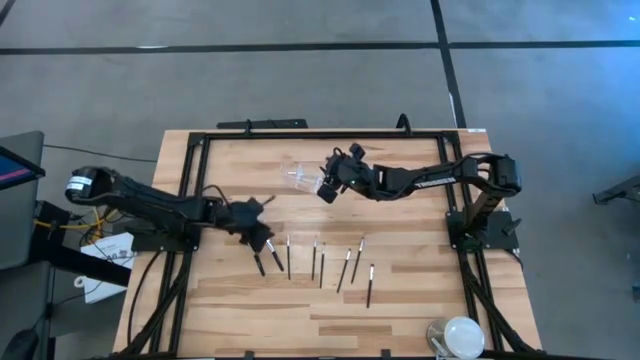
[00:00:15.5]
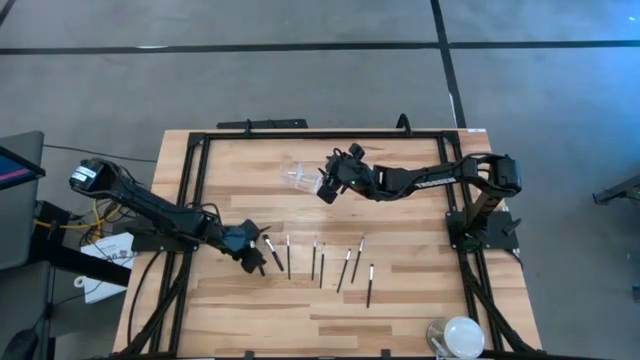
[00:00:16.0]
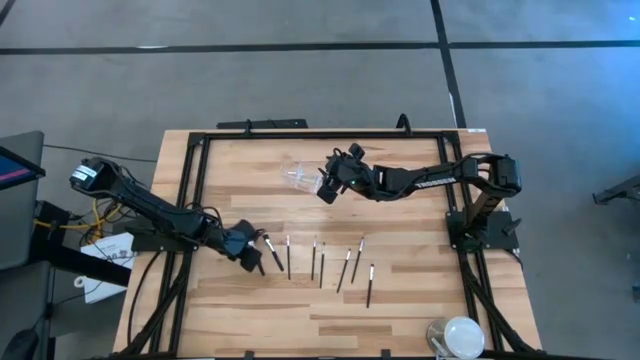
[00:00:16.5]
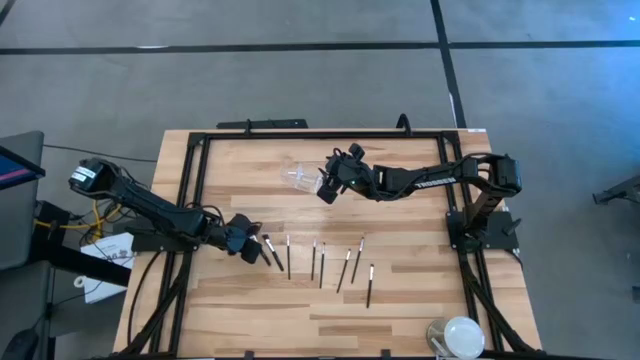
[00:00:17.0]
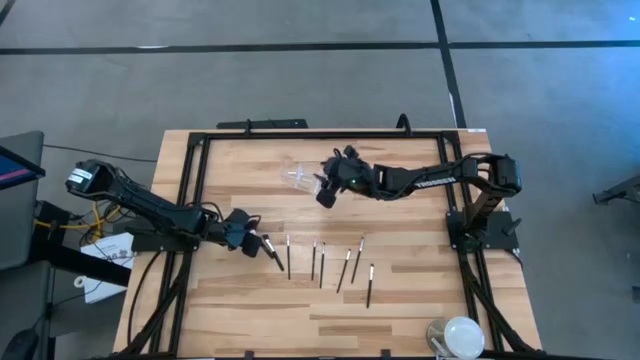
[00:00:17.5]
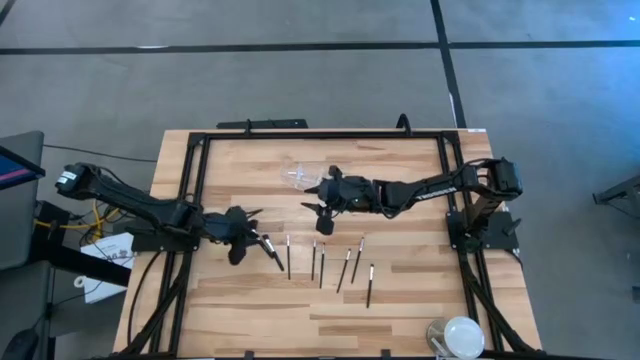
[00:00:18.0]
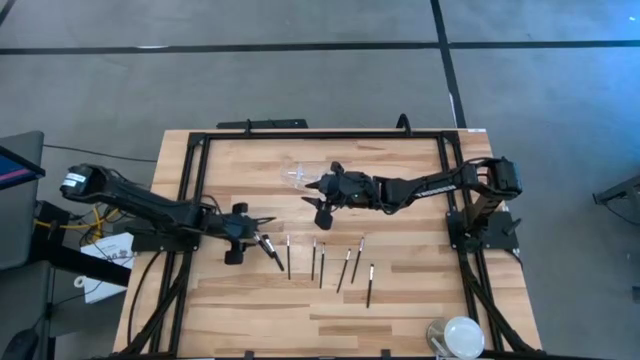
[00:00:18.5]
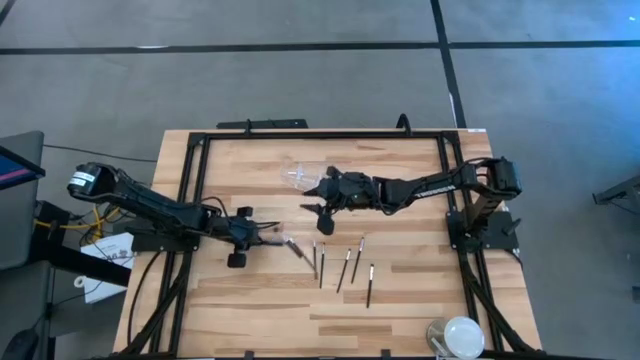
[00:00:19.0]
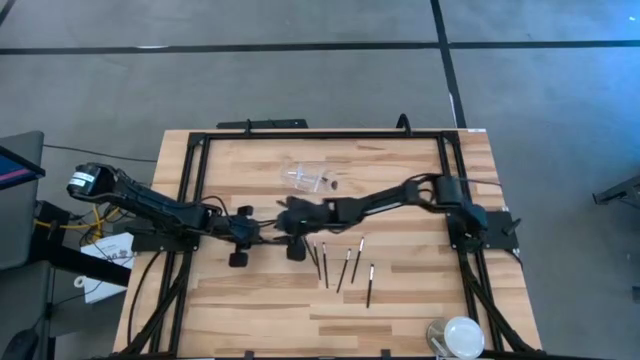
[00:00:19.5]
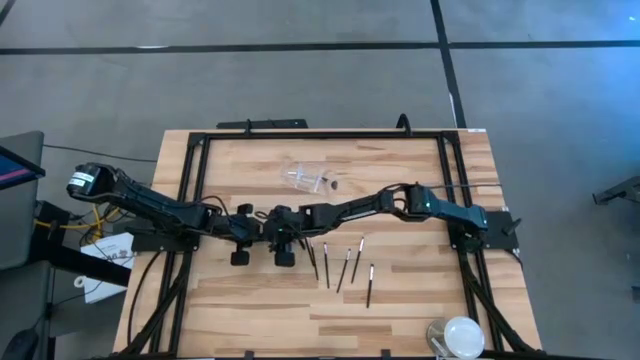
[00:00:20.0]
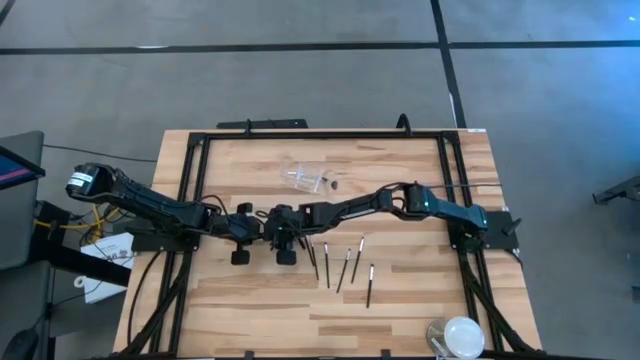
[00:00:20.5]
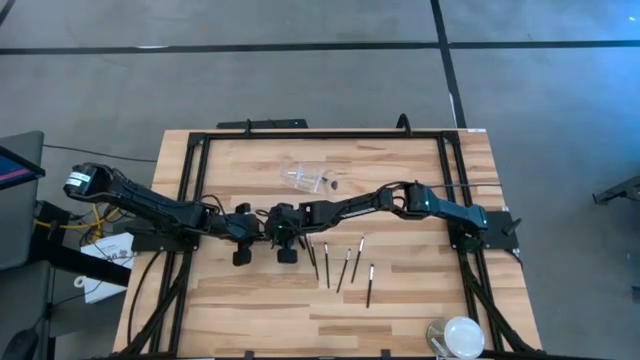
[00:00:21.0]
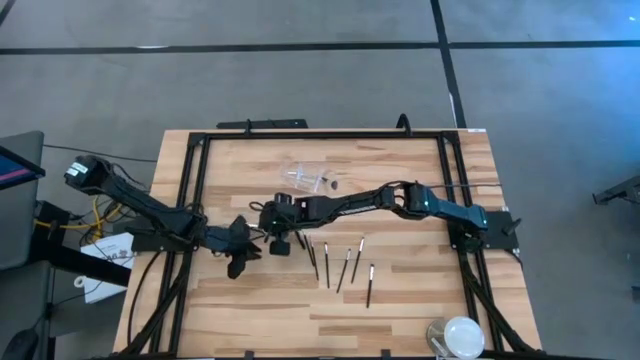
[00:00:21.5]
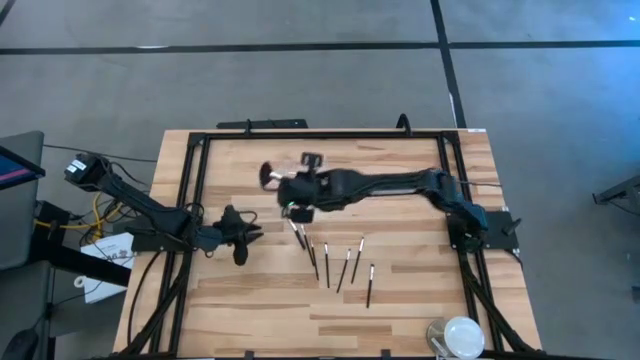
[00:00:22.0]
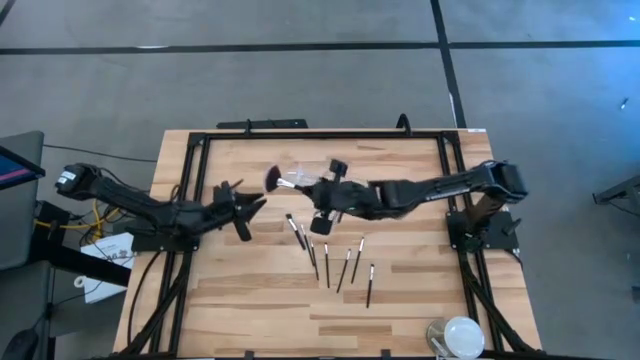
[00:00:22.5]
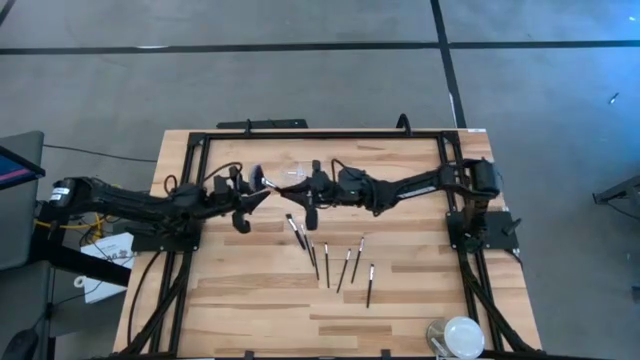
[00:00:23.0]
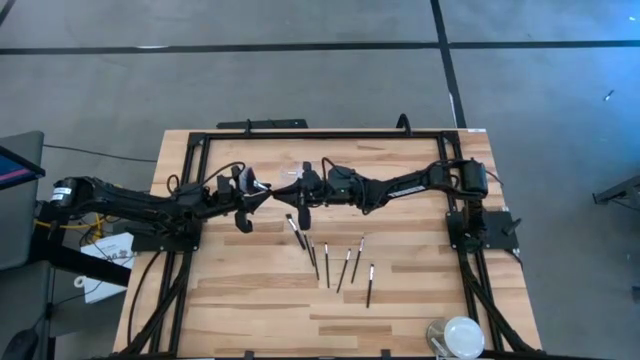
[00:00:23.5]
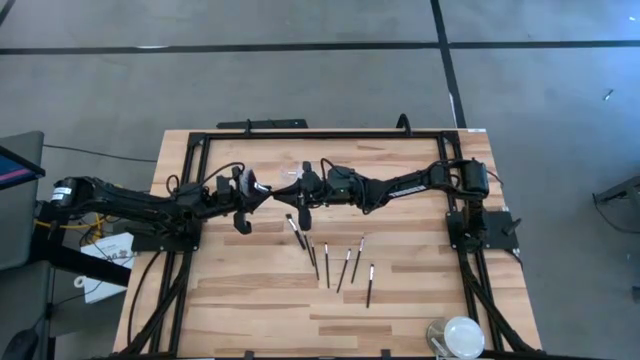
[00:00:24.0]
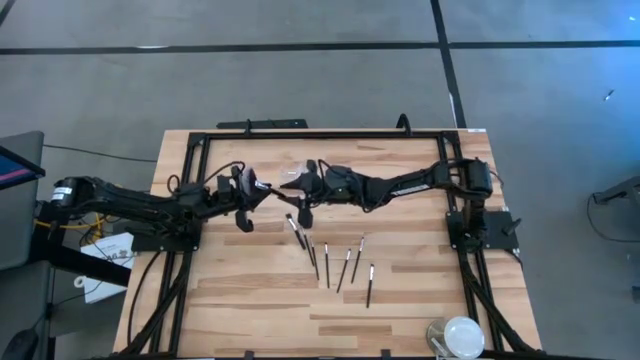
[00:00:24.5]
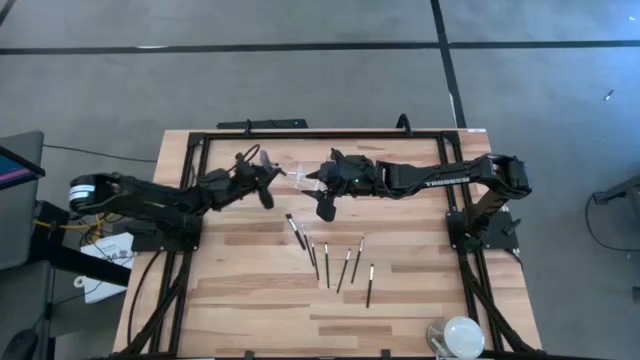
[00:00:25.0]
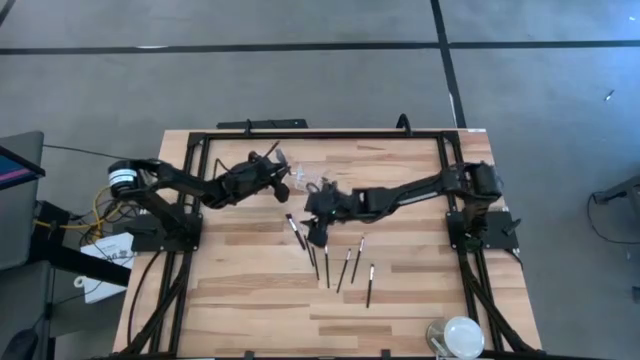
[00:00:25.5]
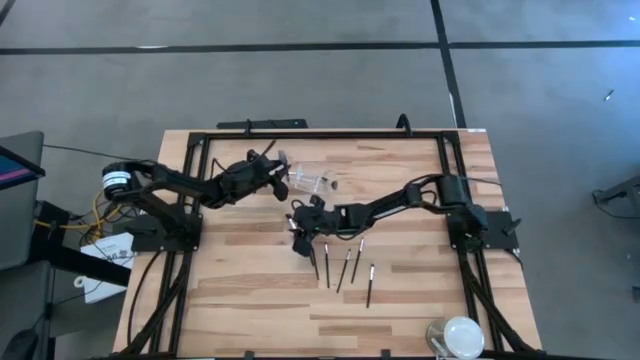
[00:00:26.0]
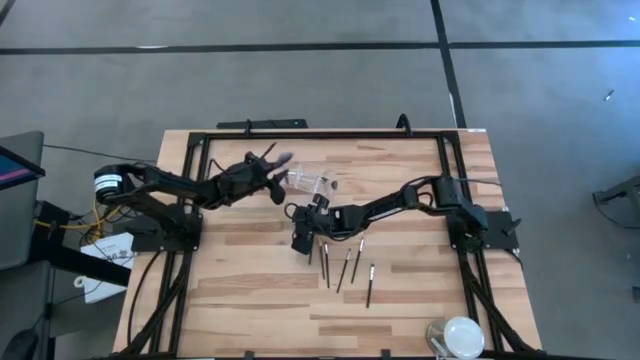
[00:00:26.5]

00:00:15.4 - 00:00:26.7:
Task: Sort items
Put the highlighter brush into the transparent organizer

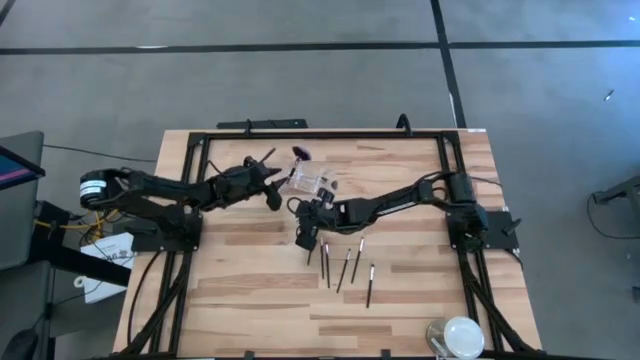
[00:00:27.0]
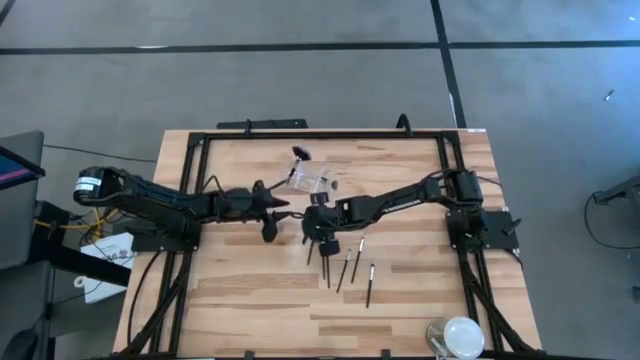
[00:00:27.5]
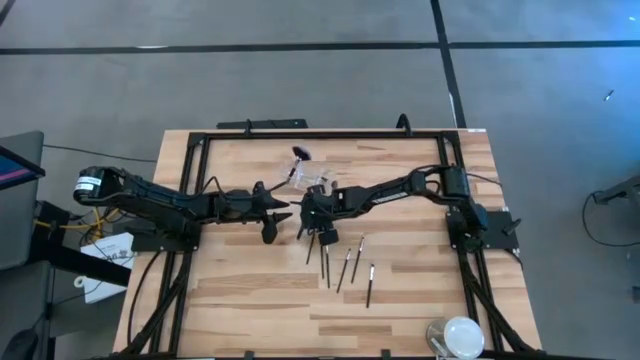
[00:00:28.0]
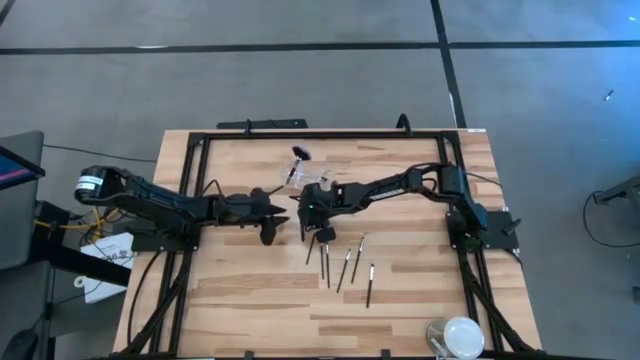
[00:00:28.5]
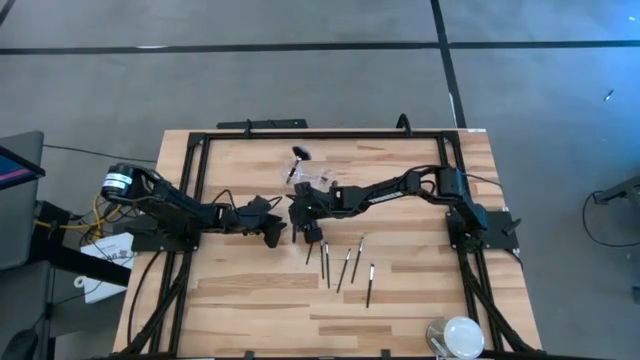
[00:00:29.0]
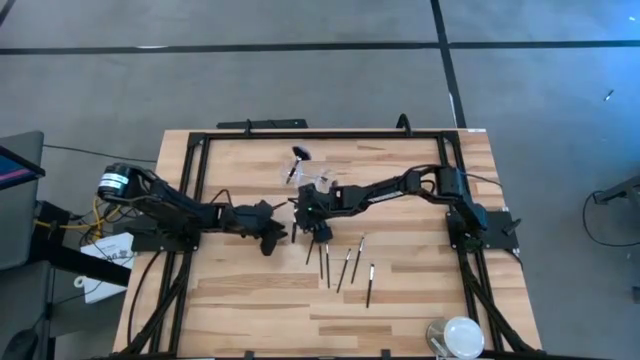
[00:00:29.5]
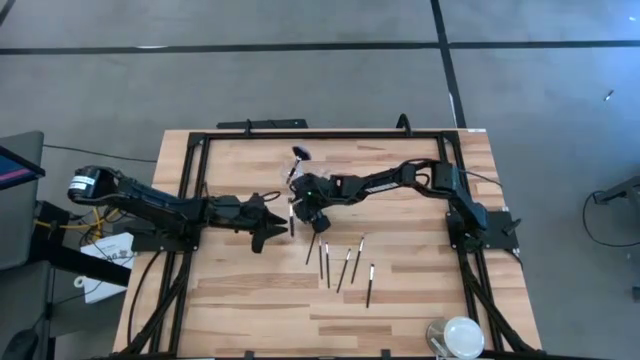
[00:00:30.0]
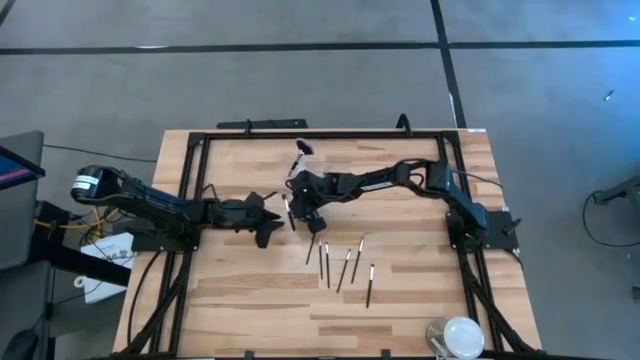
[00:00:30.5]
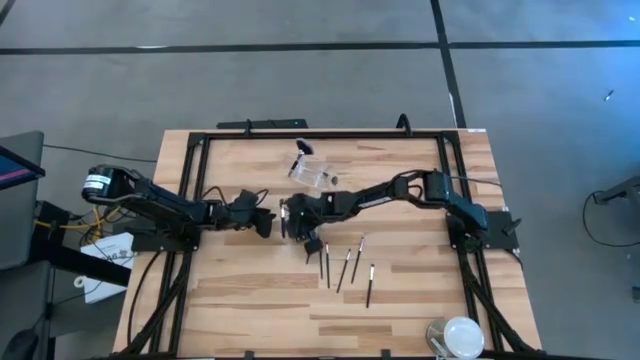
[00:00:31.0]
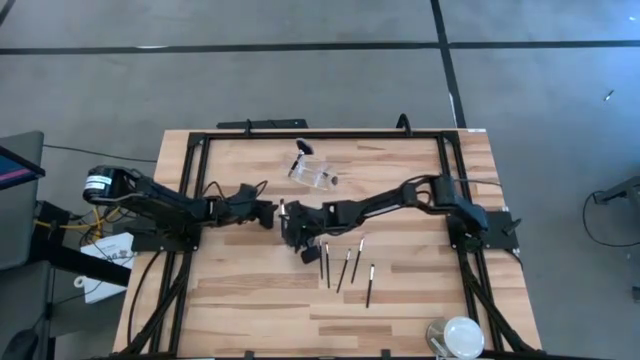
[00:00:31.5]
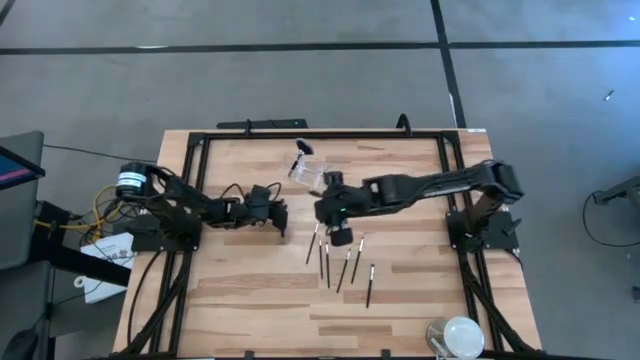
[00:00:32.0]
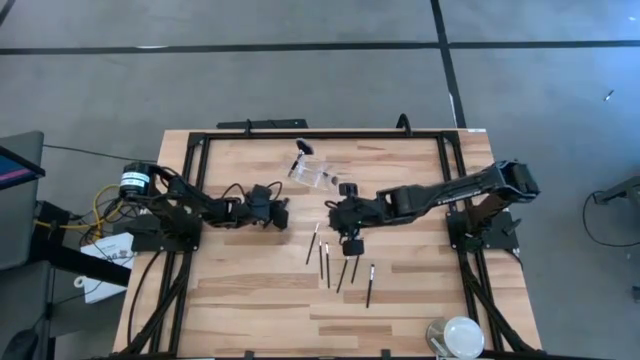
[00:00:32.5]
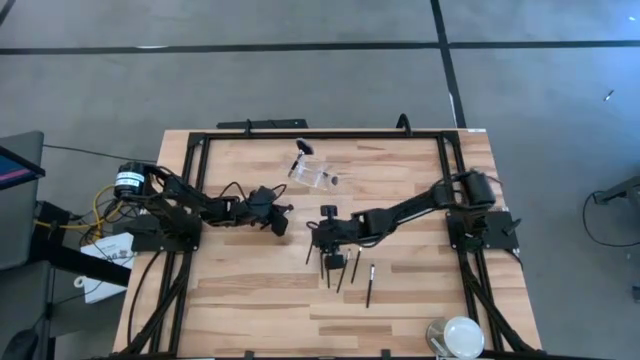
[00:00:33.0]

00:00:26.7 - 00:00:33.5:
Put the blush brush into the transparent organizer

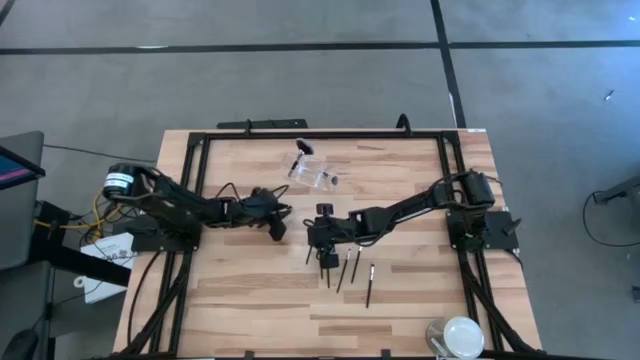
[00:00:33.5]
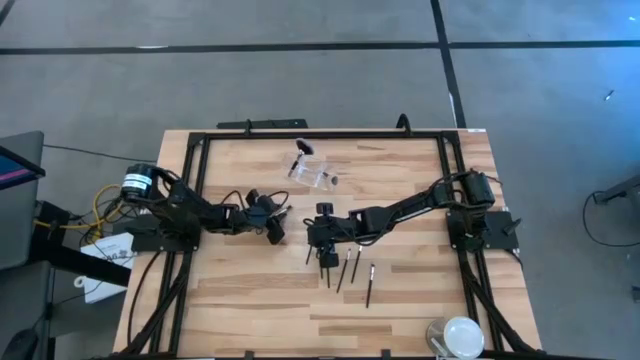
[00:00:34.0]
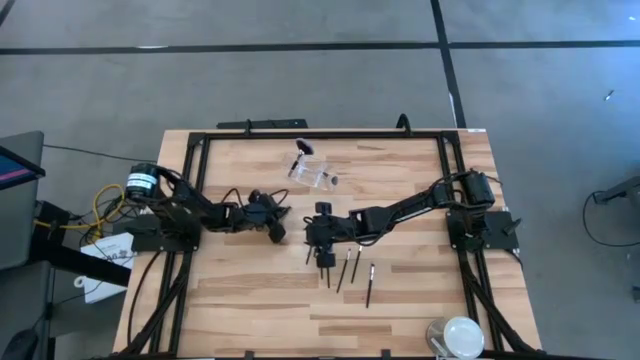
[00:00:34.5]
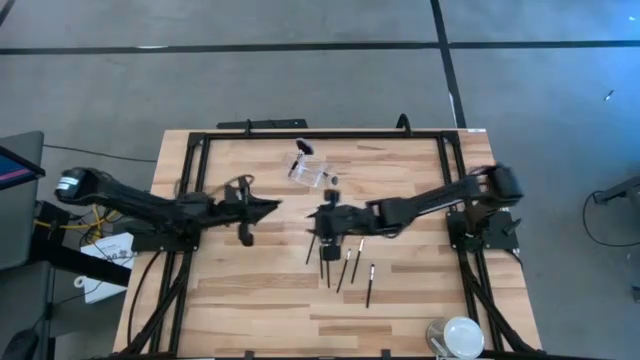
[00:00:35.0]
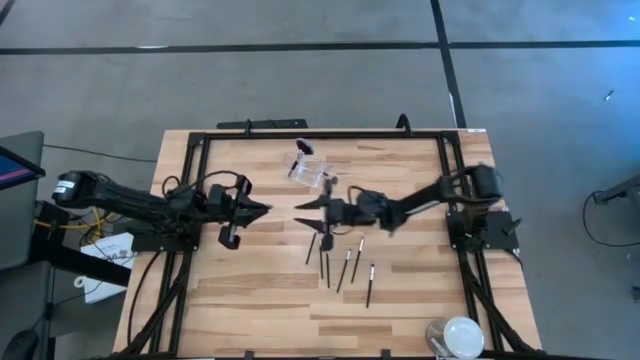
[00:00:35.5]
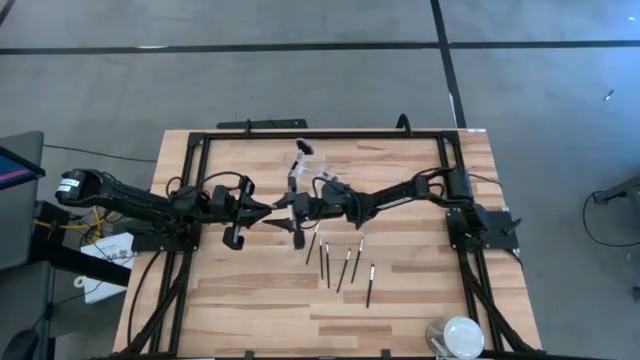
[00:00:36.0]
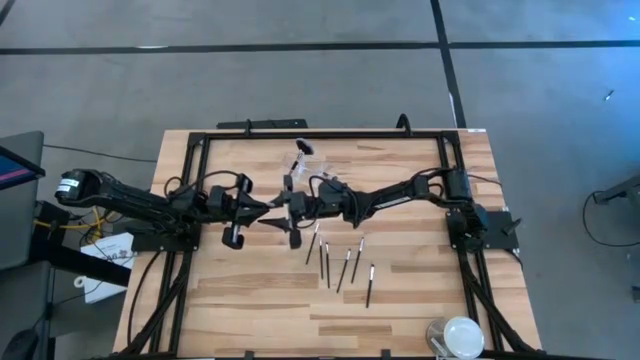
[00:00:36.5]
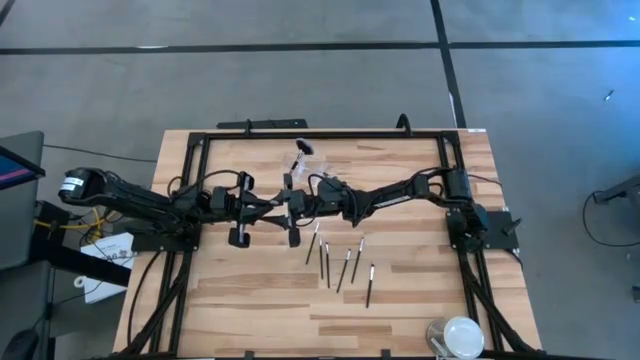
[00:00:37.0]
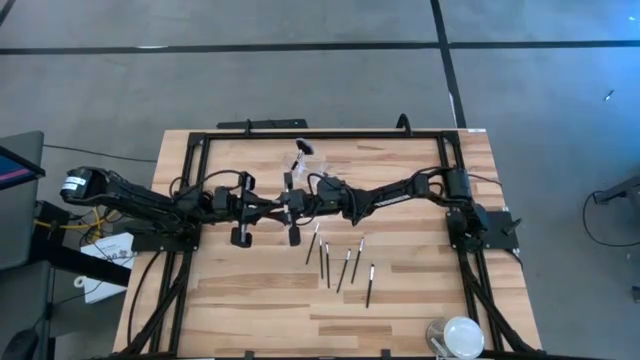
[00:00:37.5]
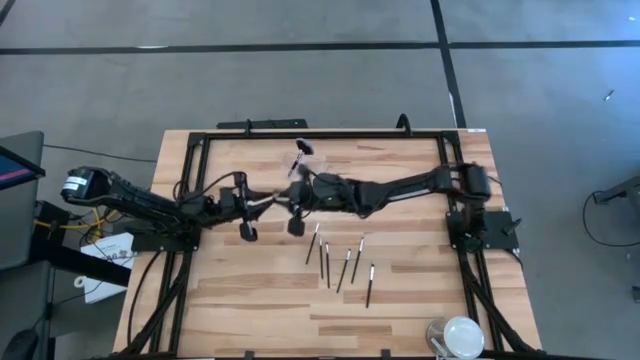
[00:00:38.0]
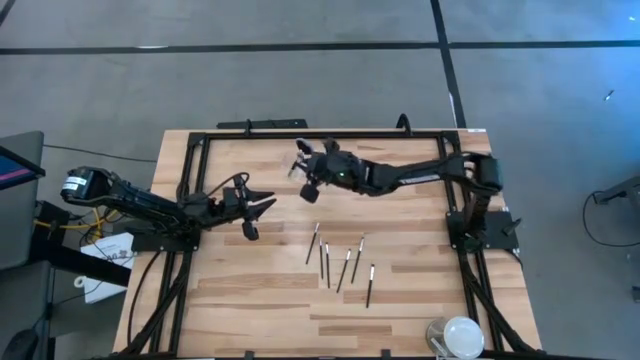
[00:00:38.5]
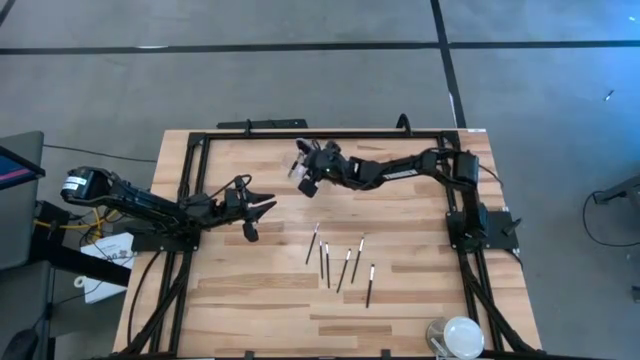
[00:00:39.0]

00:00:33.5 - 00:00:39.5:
Put the blush brush into the transparent organizer
